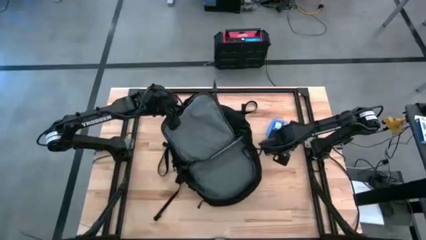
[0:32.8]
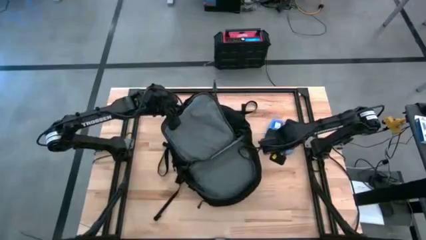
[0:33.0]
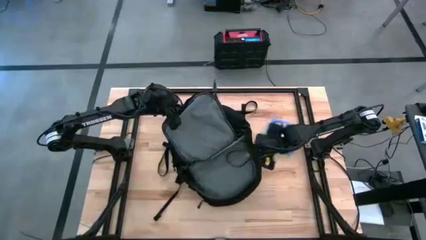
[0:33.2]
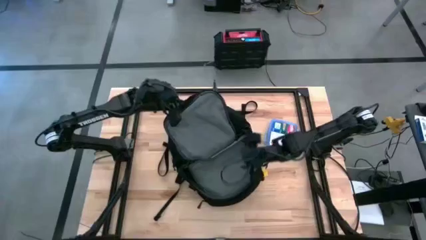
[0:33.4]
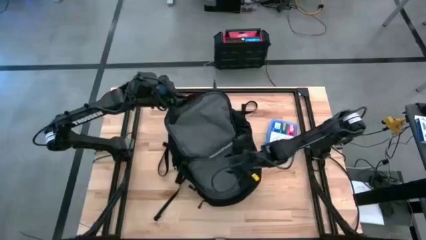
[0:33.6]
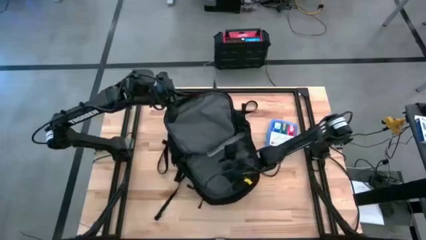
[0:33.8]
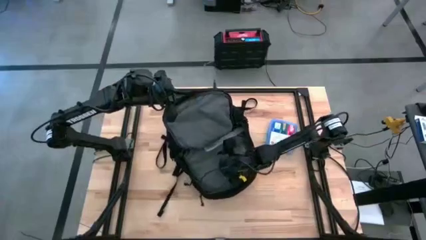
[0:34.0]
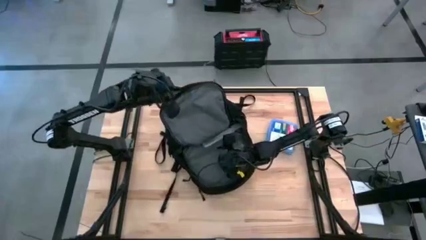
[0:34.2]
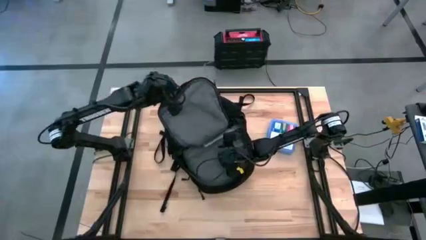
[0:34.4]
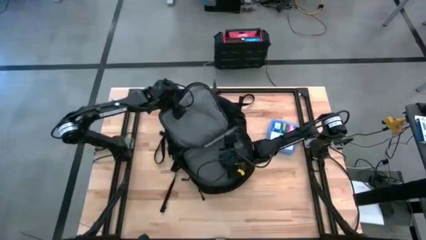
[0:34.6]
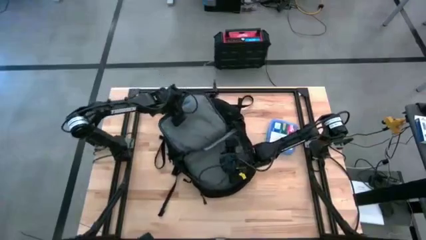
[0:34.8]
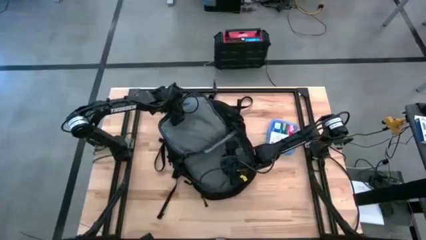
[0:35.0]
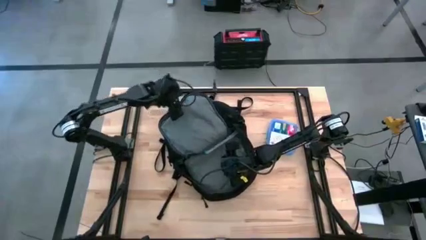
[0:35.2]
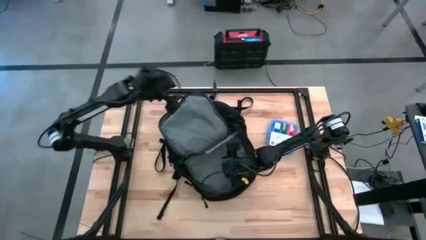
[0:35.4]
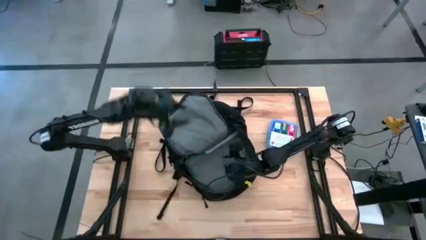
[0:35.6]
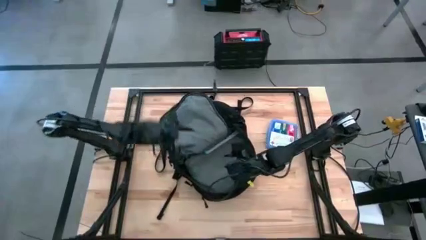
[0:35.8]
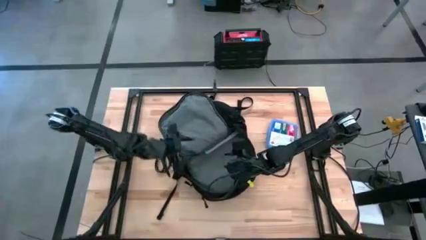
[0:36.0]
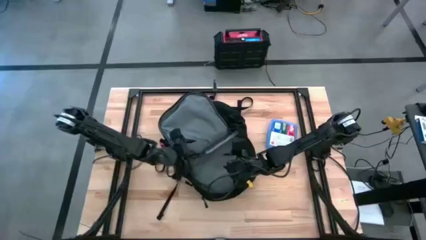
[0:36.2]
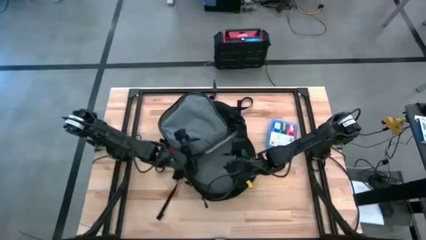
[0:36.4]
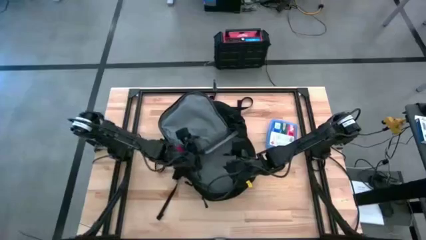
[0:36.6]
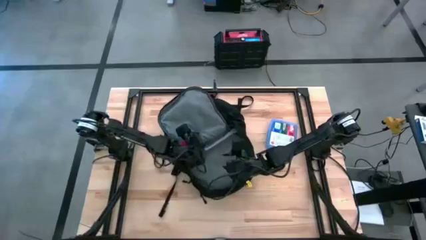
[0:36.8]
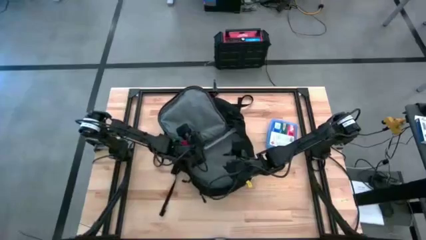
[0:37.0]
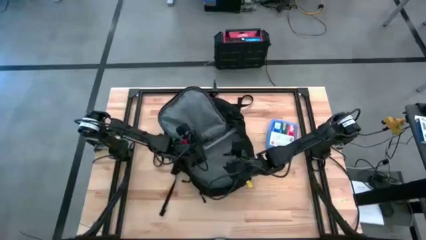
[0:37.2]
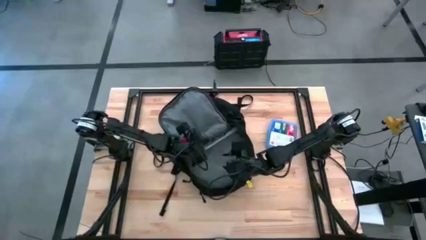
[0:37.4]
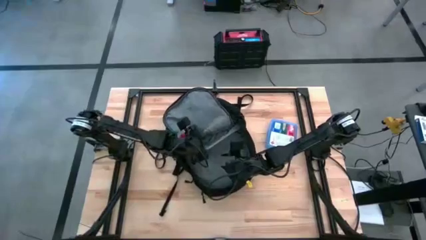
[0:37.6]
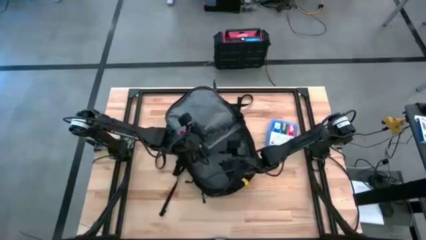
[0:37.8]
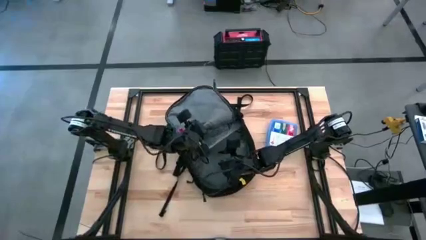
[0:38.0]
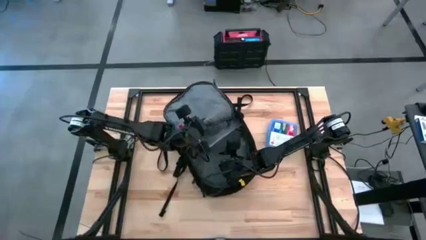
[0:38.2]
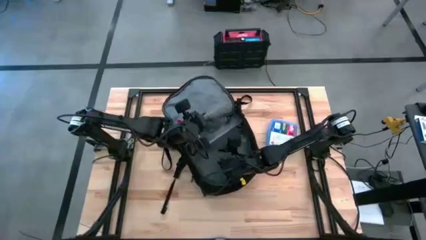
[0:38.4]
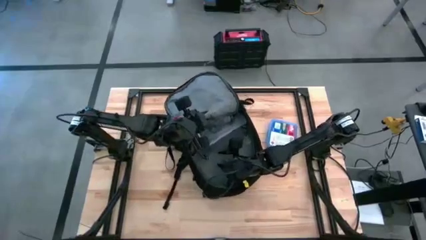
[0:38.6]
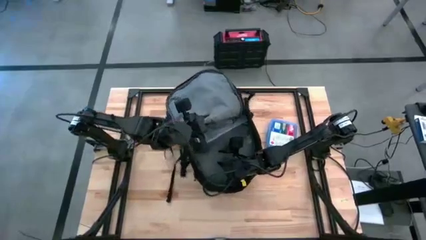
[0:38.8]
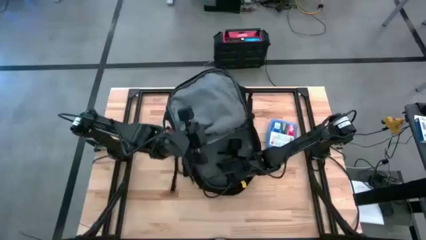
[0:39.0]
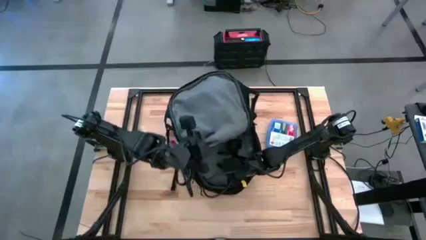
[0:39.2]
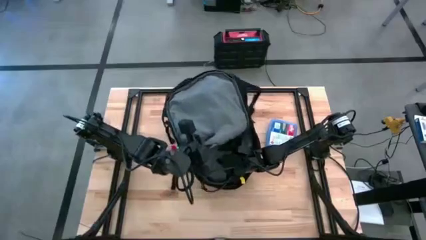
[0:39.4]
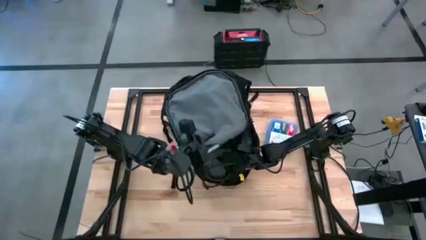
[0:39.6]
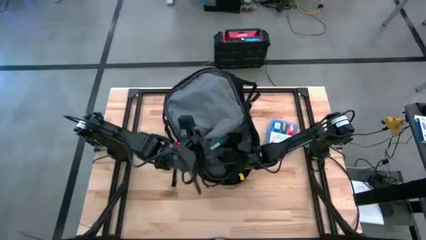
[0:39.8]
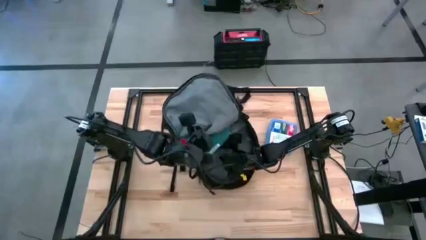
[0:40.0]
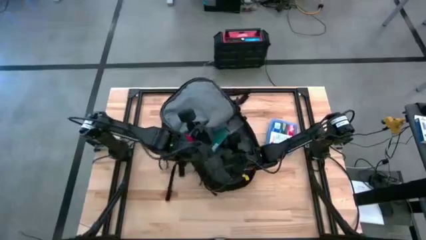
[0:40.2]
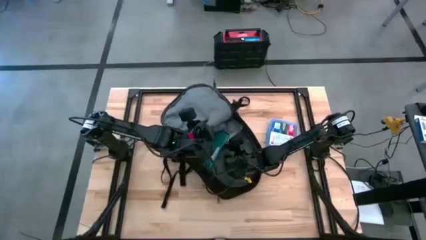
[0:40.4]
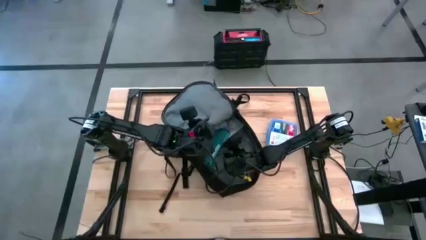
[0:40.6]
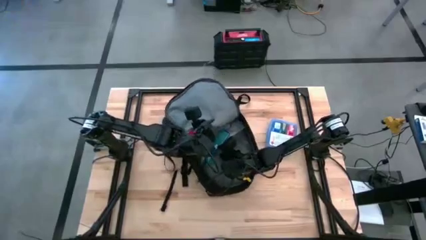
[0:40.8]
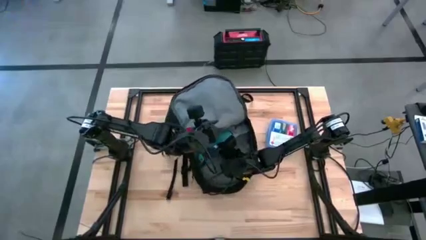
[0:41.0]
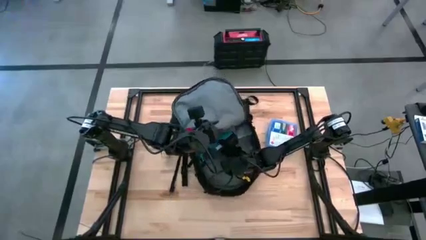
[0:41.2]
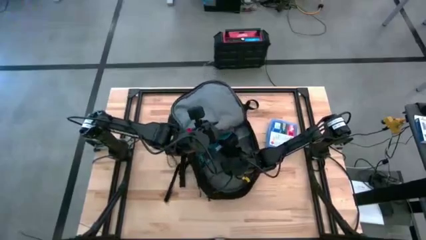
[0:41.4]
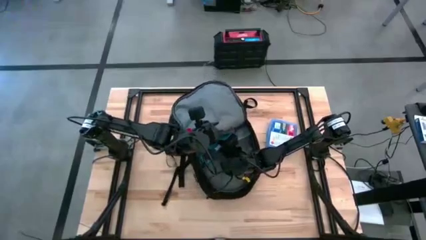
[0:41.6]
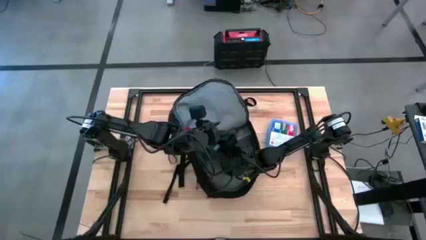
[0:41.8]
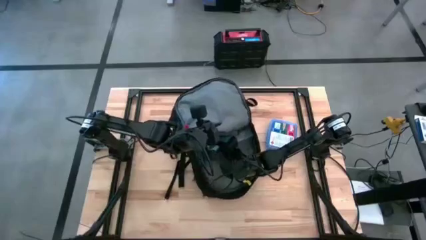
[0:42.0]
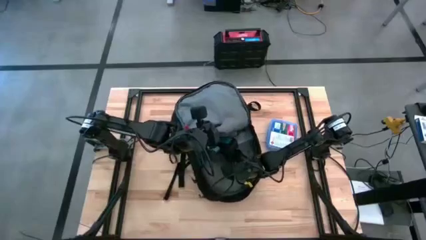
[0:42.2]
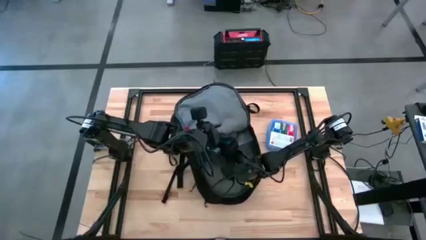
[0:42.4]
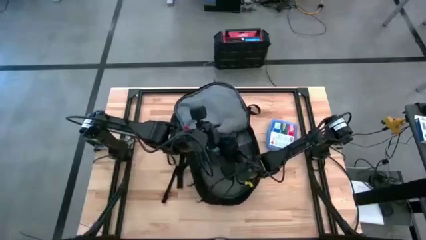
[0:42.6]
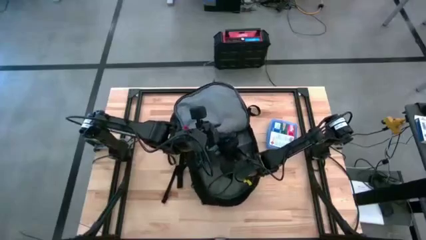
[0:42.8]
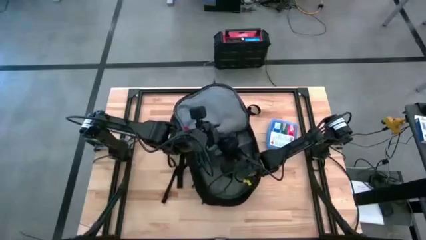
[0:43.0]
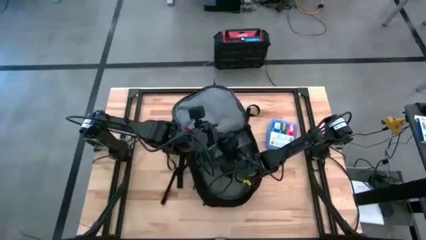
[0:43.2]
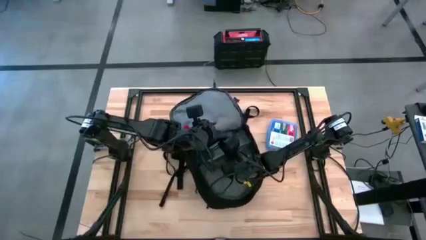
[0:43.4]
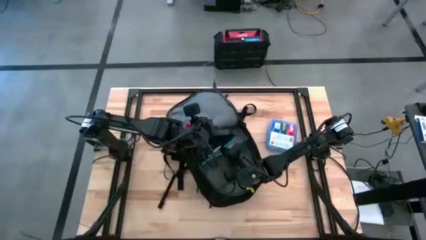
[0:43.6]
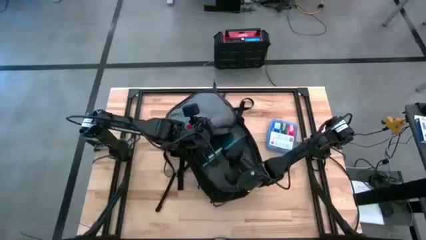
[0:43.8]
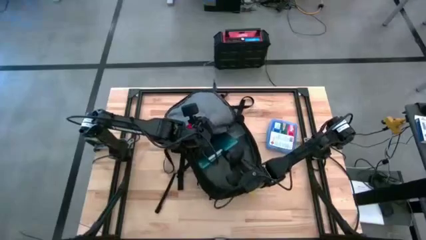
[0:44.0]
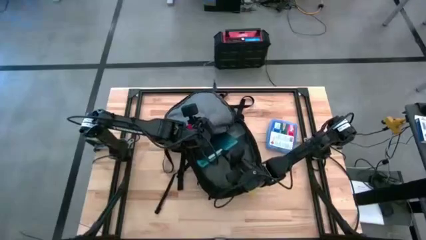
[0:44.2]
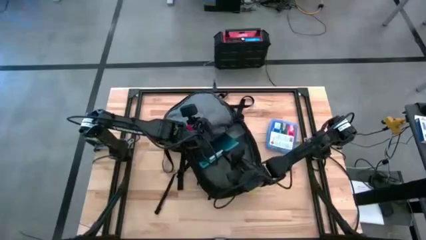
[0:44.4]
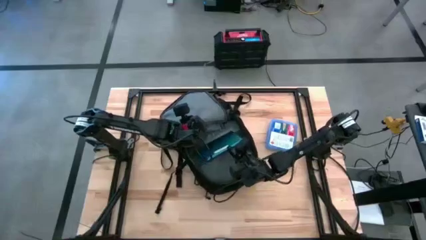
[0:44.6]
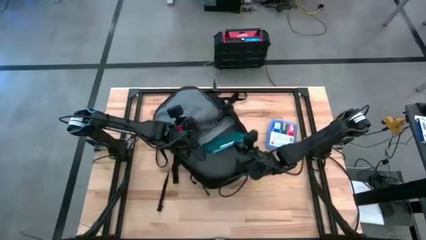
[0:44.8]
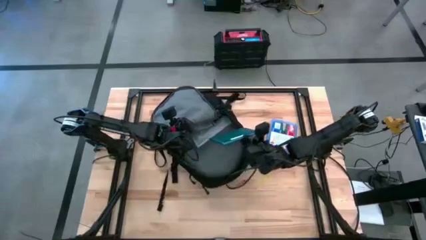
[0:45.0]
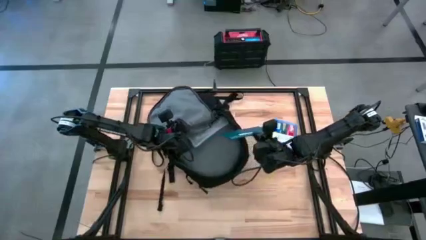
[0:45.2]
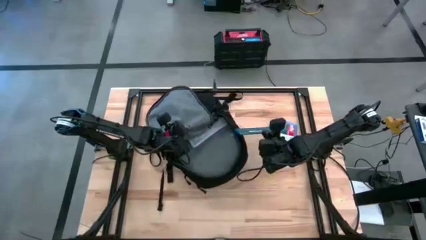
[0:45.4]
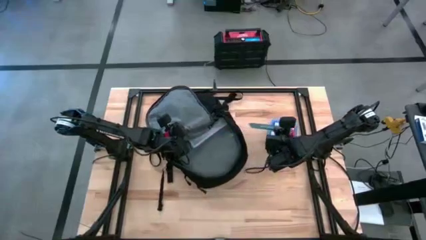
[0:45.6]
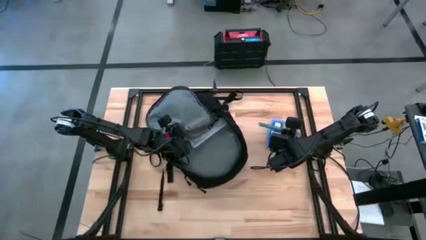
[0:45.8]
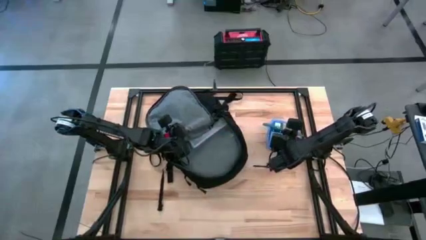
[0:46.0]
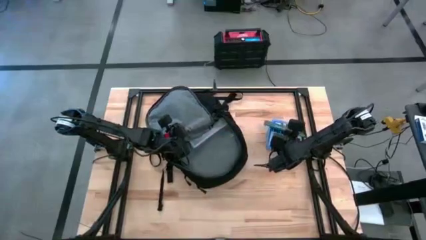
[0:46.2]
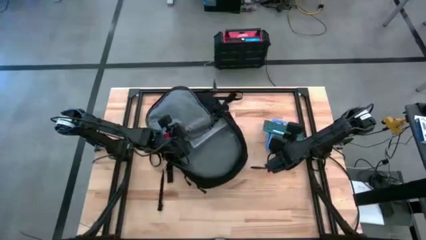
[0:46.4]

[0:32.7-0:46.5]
Task: Unpack backpack
Remove the blue tablet device from the black backpack

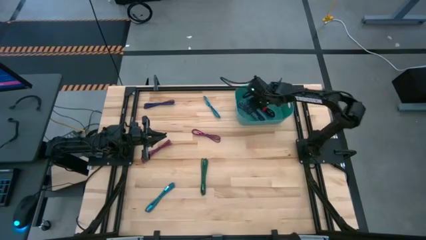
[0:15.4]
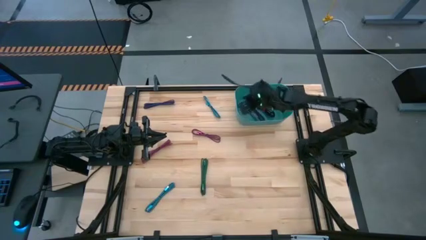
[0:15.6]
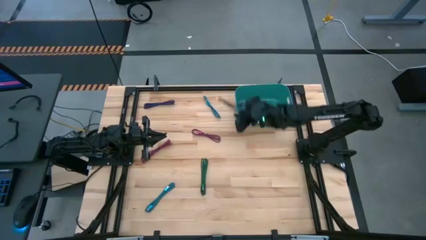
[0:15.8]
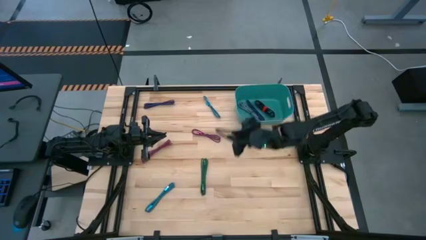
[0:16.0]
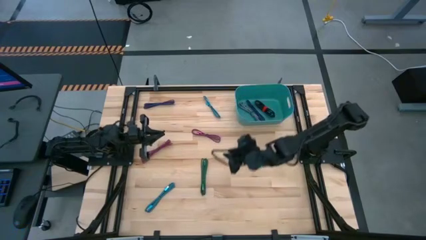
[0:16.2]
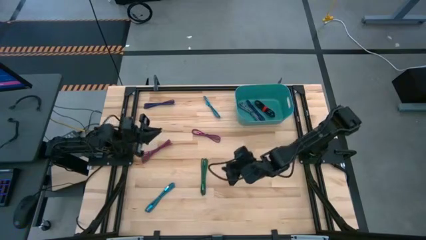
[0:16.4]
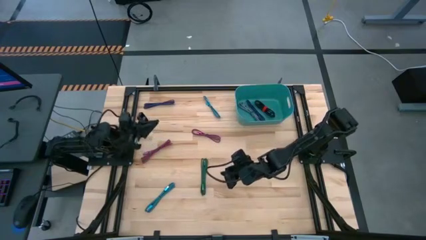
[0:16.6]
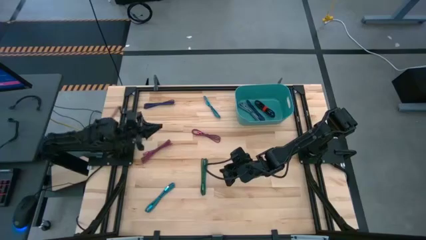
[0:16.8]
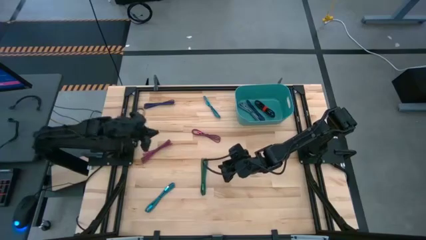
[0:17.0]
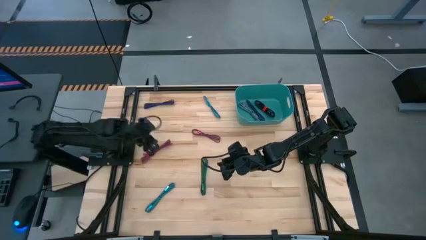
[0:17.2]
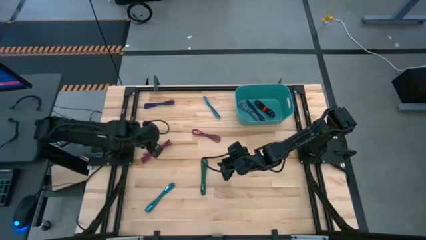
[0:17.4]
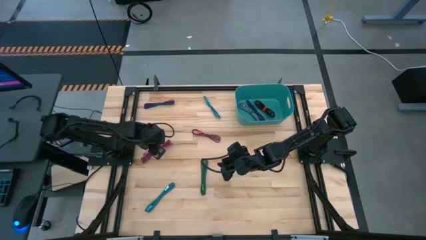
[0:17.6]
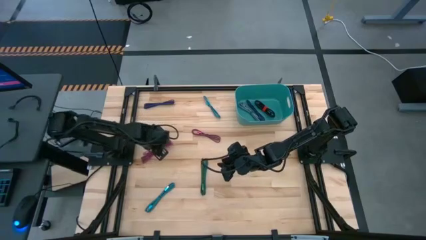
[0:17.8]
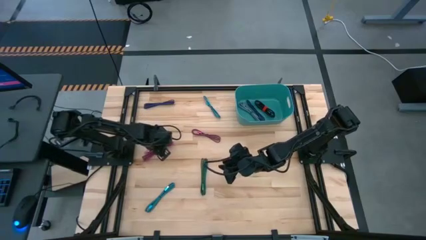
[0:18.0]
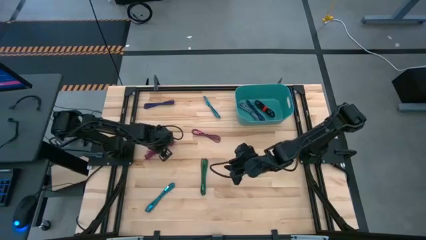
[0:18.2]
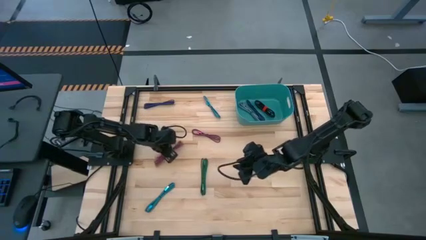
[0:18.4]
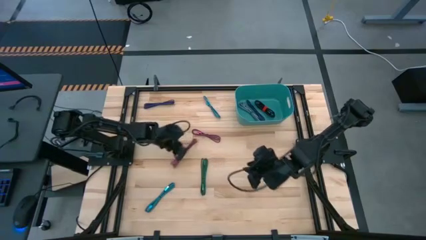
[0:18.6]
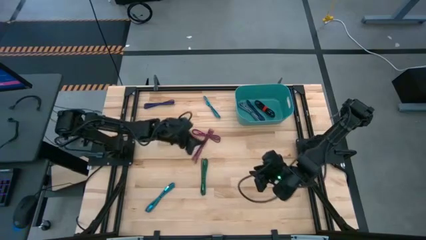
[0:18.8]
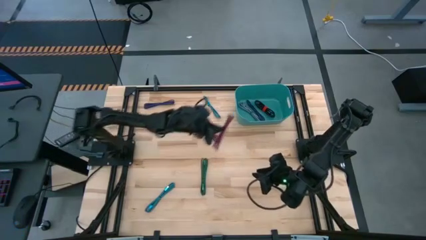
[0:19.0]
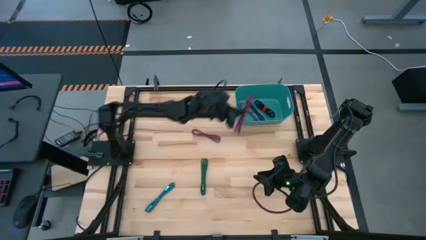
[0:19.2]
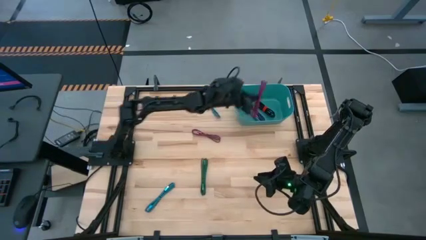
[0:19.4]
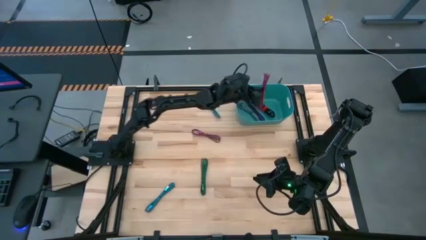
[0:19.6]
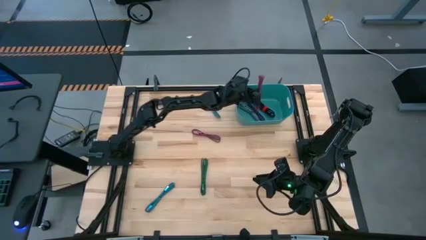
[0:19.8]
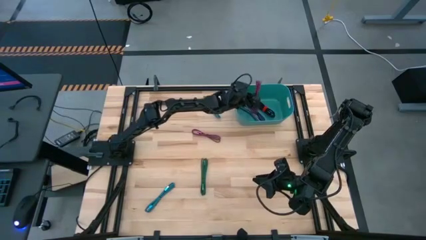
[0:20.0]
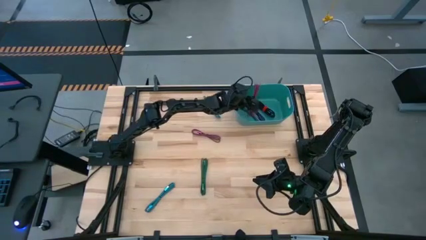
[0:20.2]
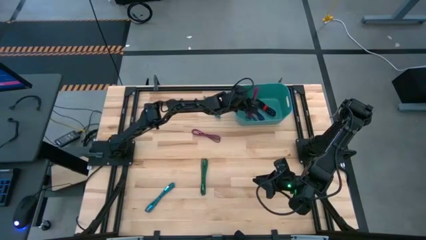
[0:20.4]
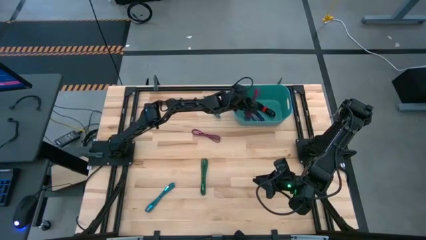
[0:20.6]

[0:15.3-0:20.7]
Task: Pick and place USB-C Cables
Put the left pink charger cable into the light blue bin
